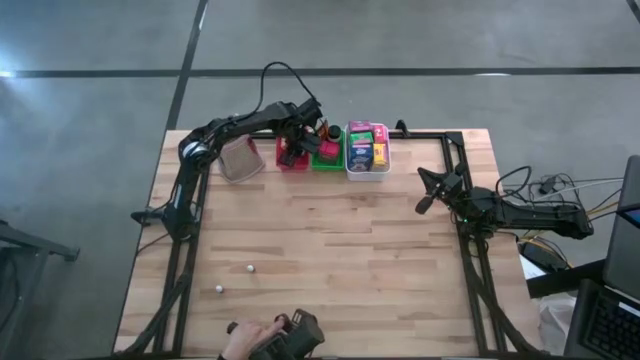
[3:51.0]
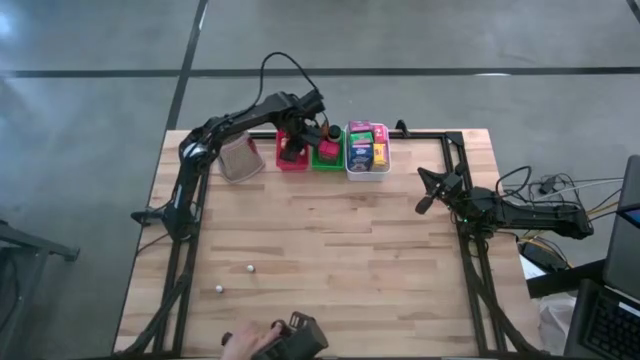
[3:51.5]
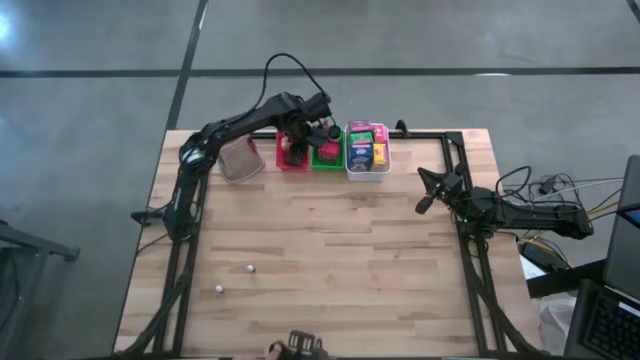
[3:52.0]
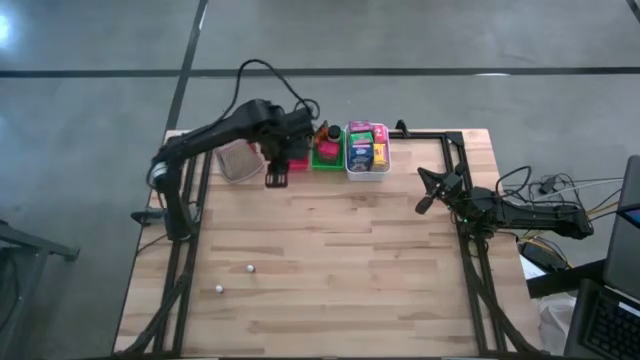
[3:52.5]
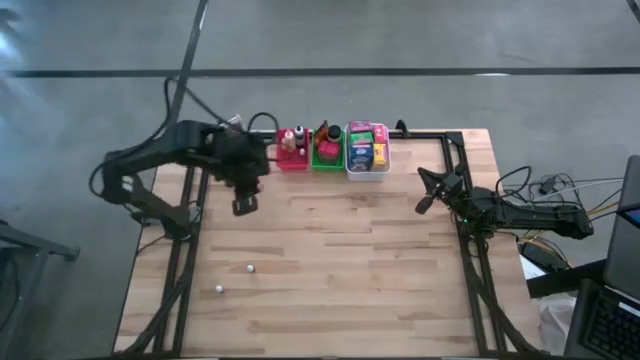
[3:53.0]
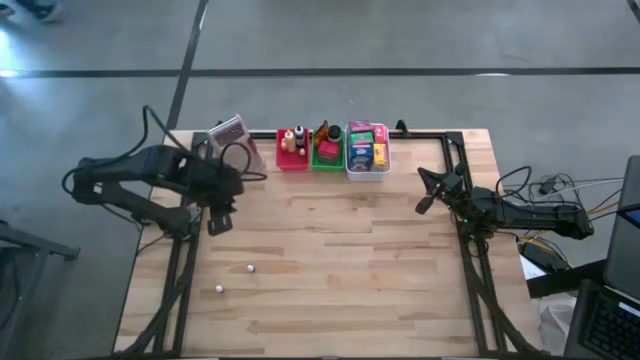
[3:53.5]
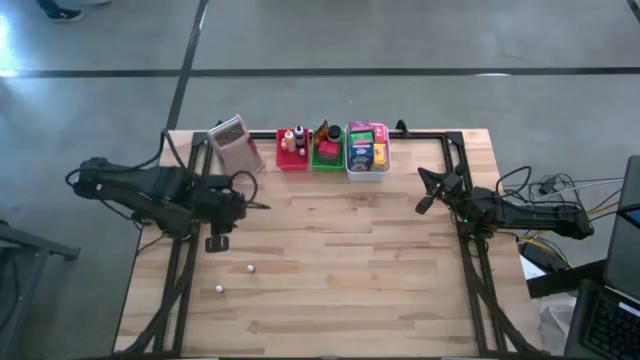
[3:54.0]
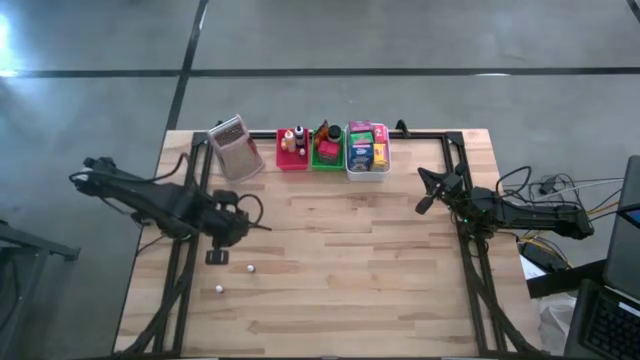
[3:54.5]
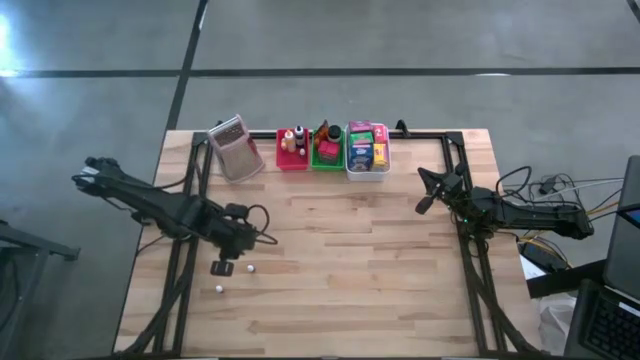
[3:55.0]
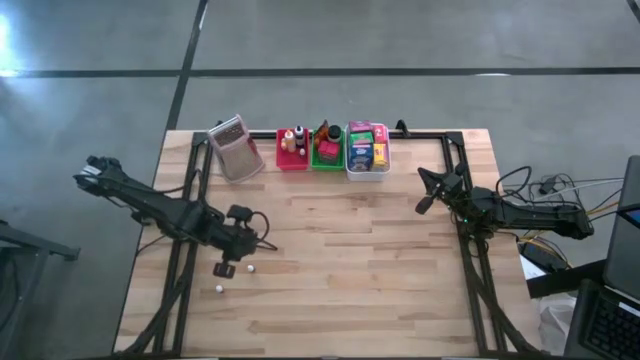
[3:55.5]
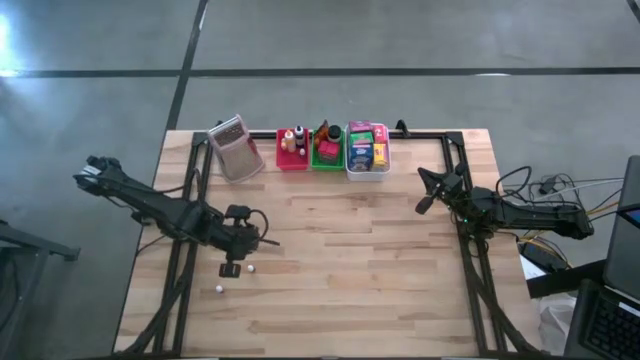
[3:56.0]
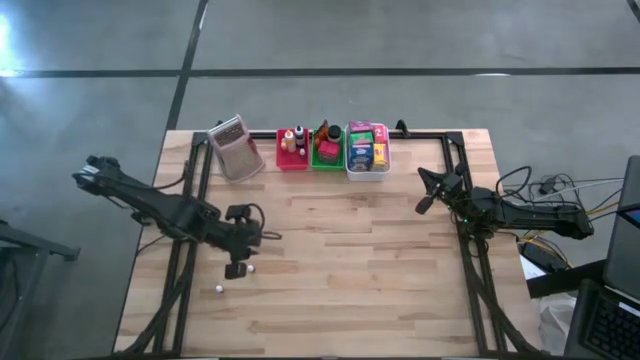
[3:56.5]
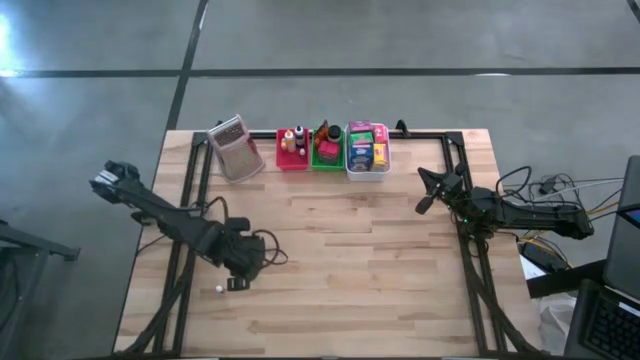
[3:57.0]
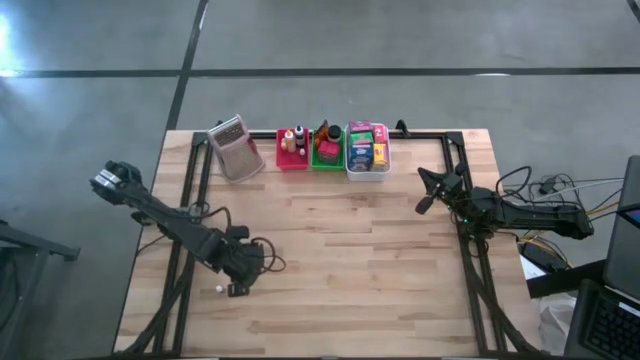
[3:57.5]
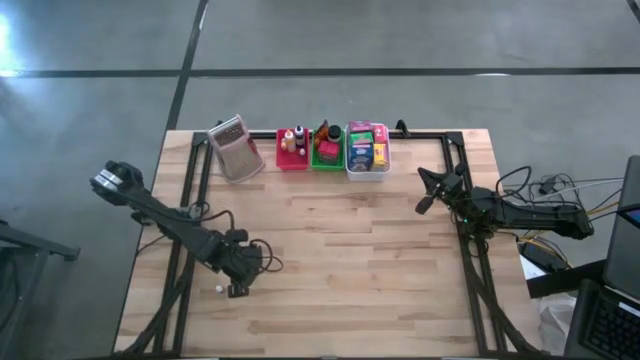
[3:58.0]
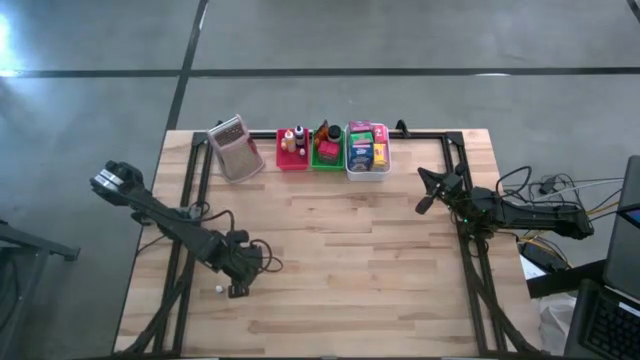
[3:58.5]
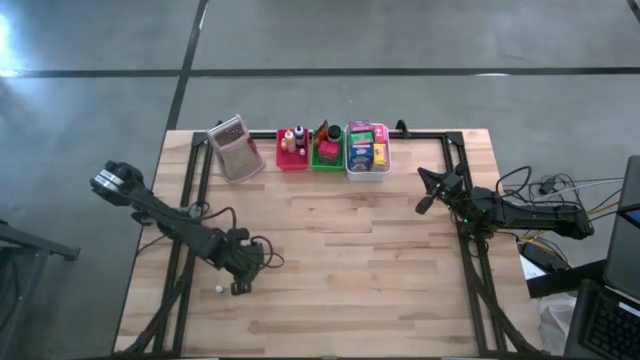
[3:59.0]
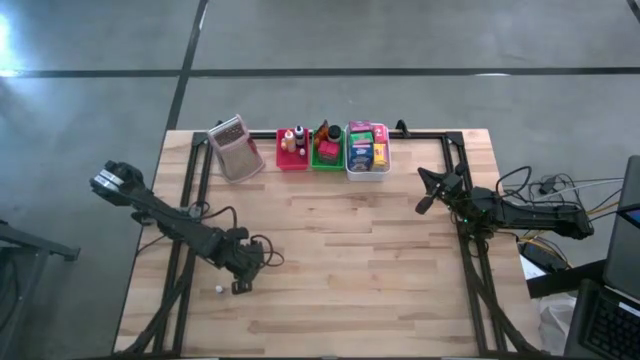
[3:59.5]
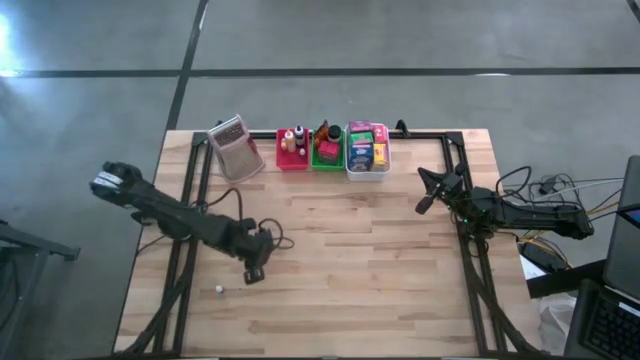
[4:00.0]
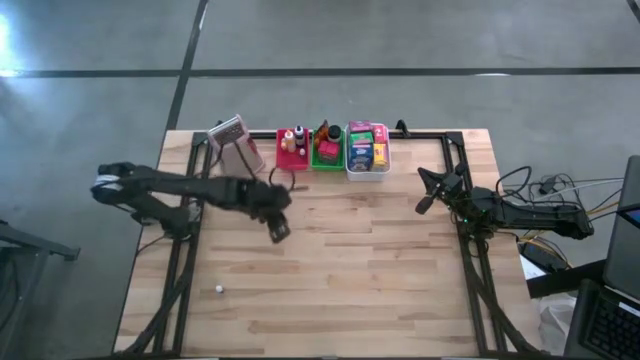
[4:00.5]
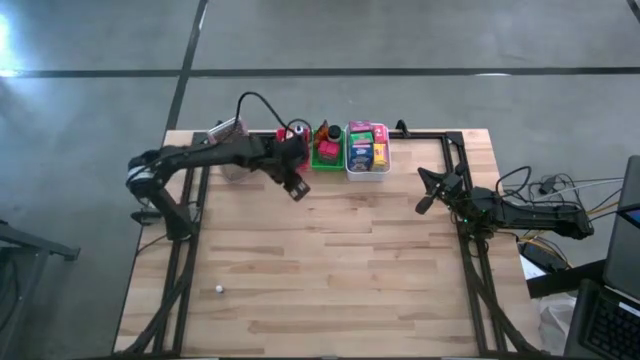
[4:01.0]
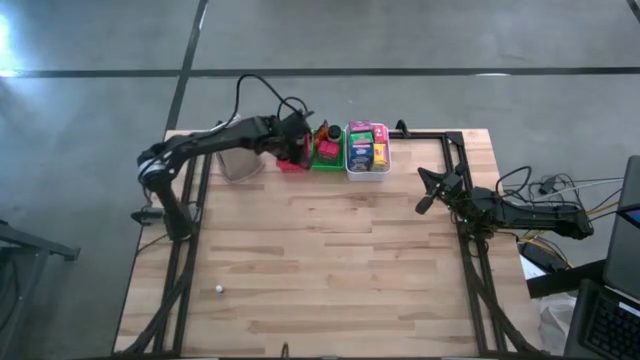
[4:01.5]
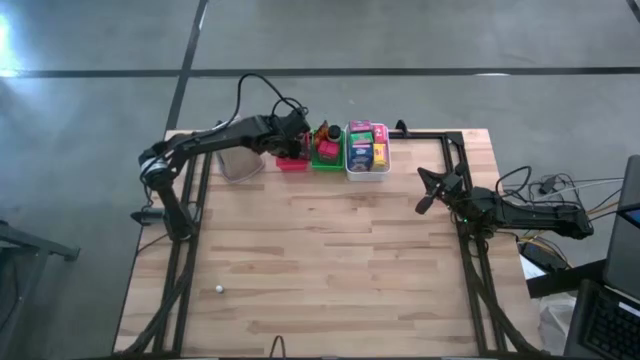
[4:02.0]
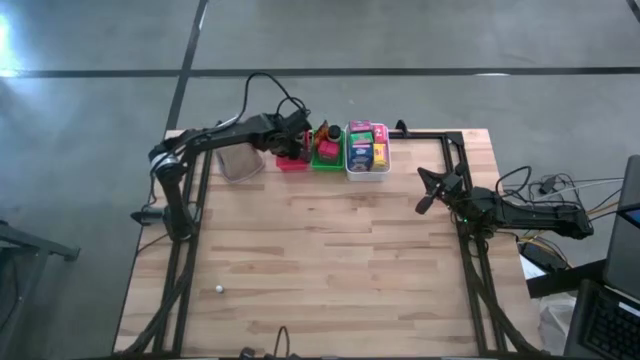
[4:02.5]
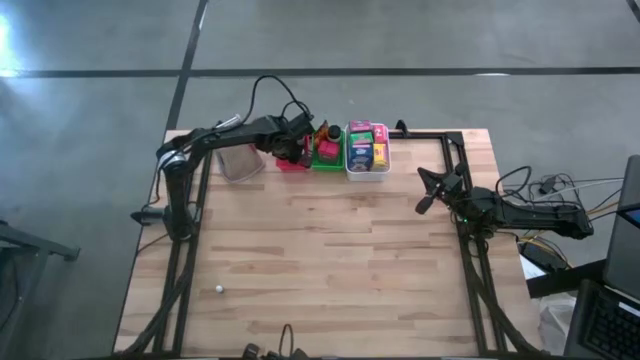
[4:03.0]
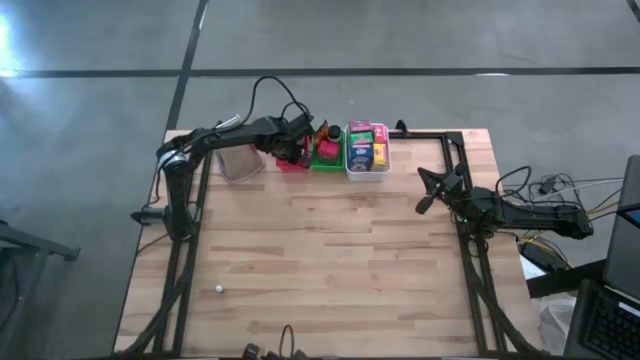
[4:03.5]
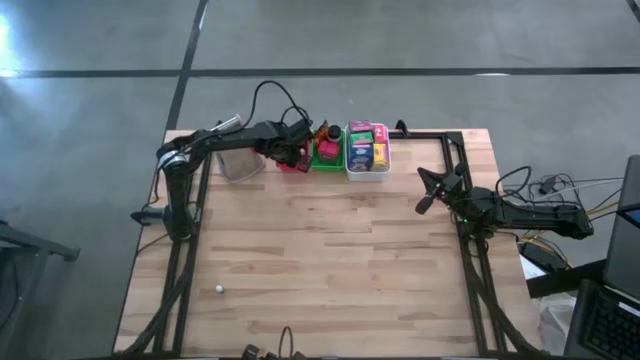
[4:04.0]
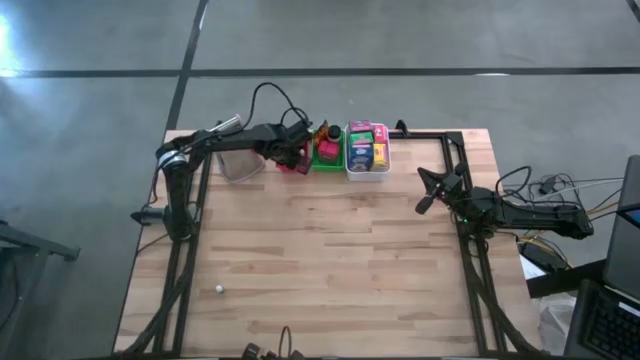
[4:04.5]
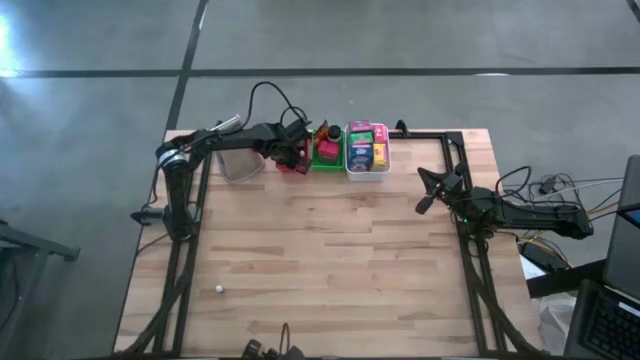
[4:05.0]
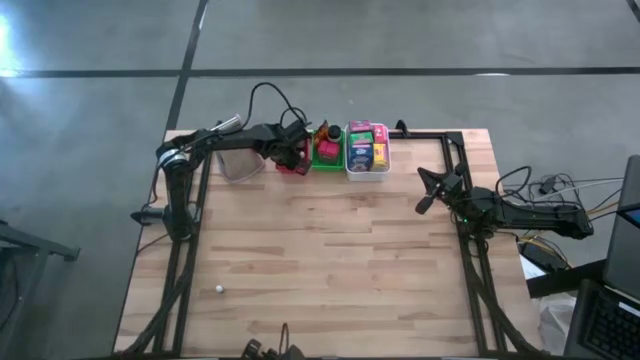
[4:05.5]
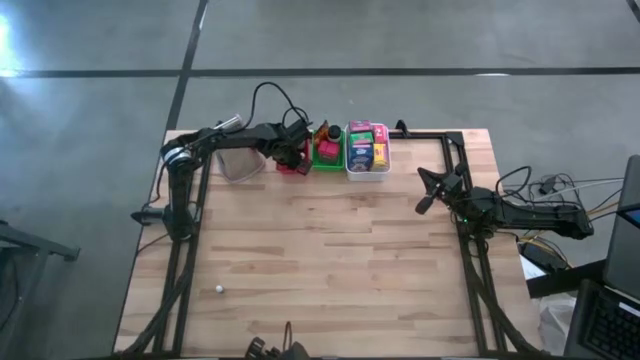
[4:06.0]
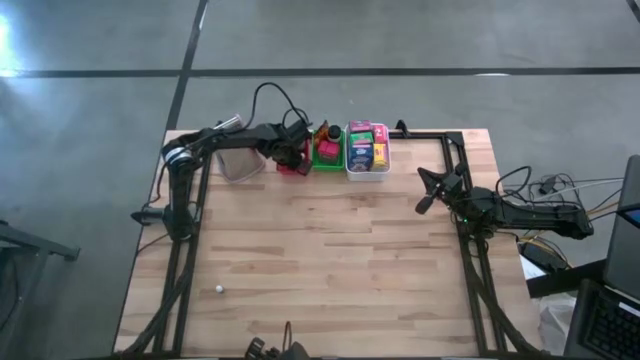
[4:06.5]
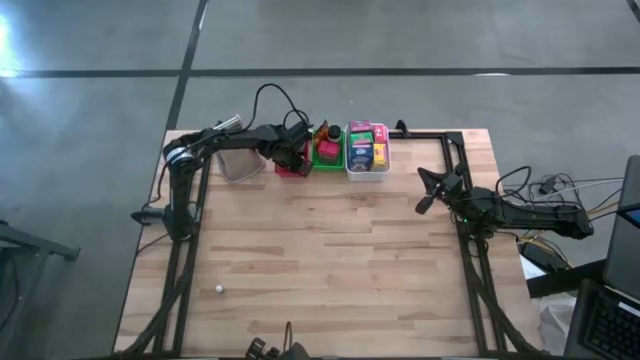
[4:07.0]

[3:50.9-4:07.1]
Task: Pick & Place Kitchen Items
Put the small black food coloring bottle into the red bin

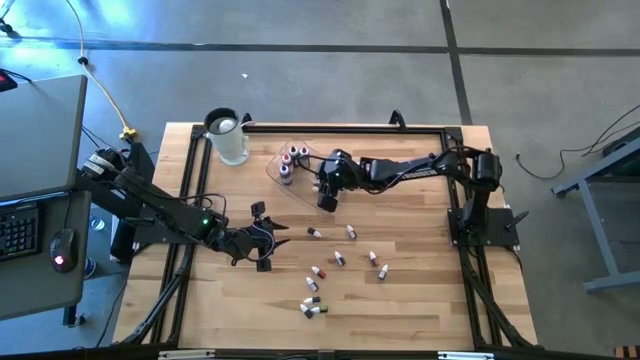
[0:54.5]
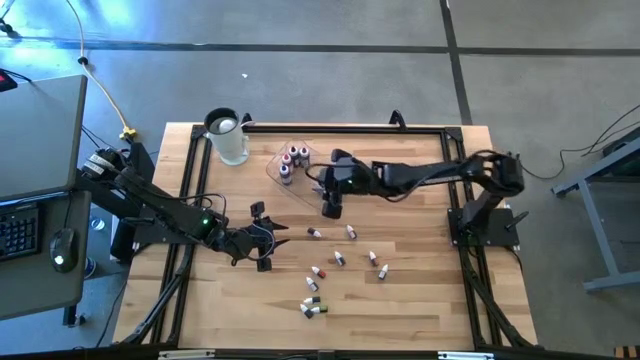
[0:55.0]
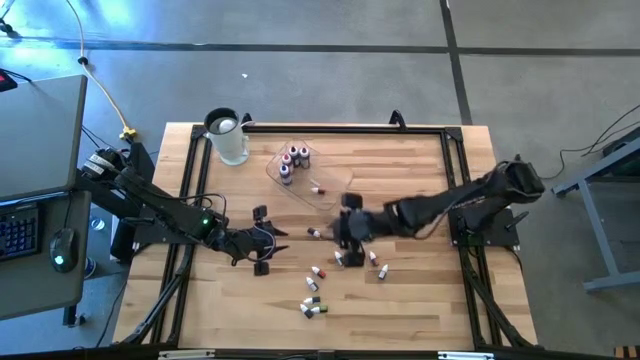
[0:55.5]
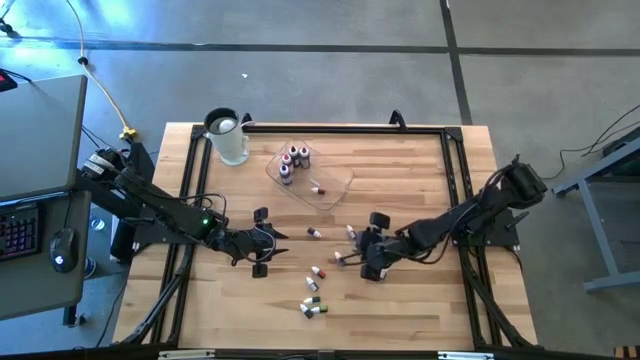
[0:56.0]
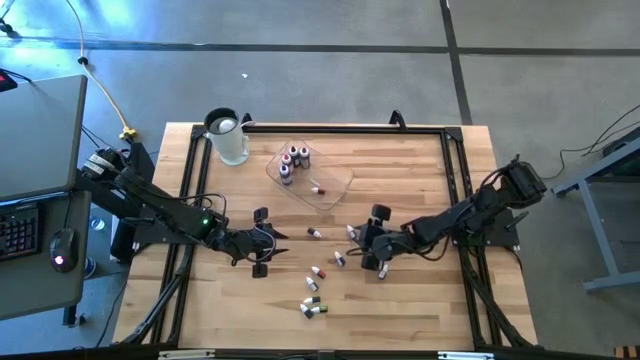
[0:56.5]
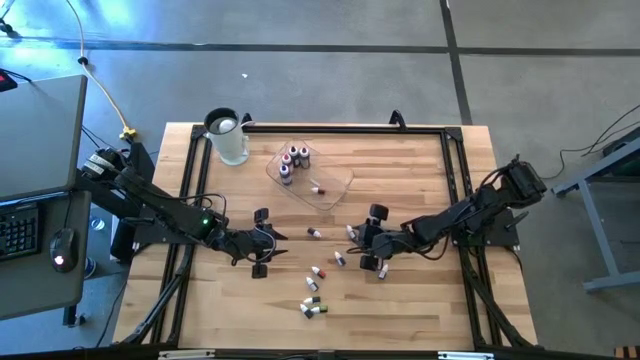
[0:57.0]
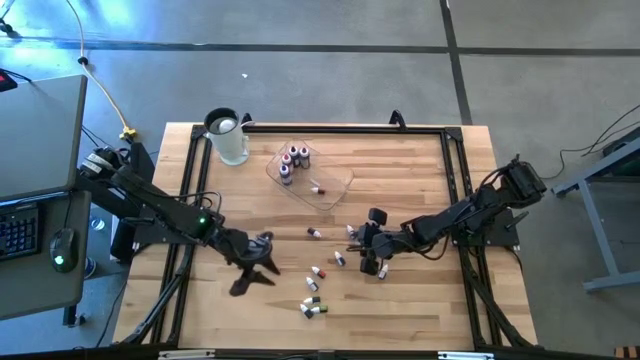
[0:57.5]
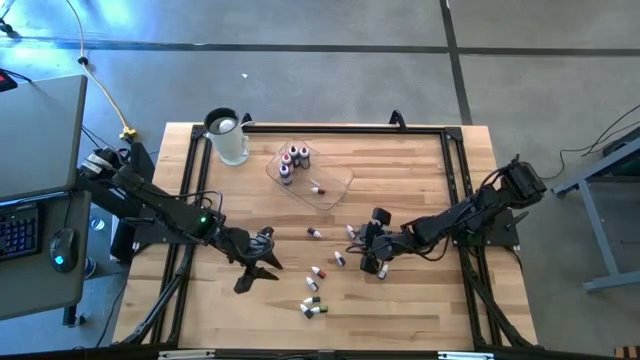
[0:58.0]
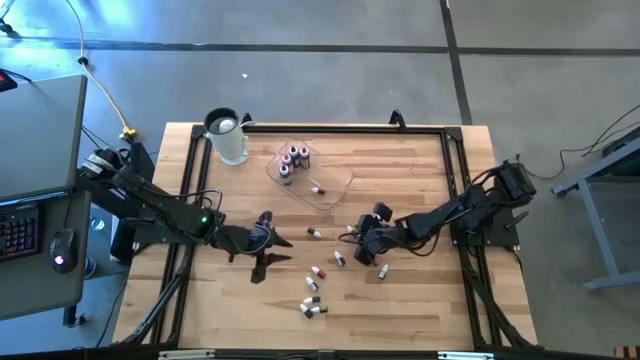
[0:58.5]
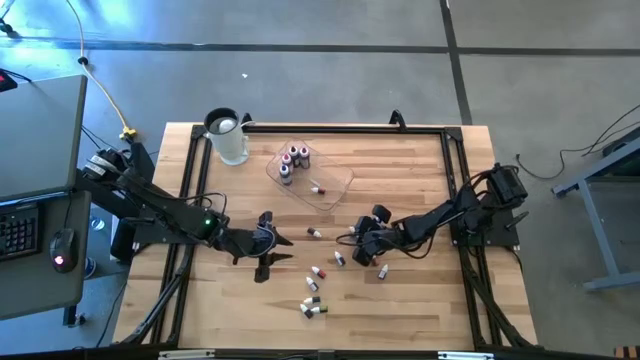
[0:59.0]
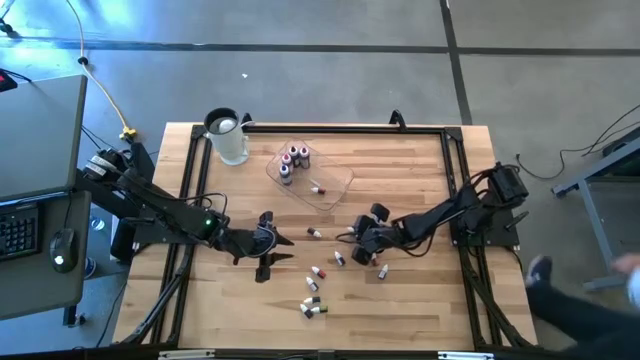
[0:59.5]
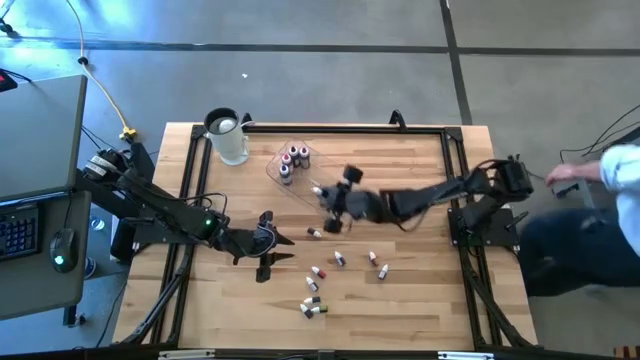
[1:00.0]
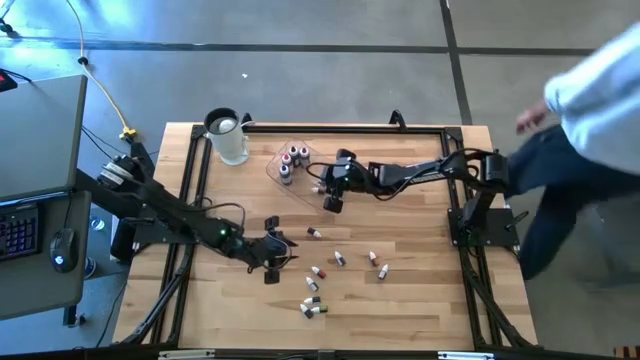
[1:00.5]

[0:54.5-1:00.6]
Task: Pick & Place food coloring
Put the top small black food coloring bottle into the bin
